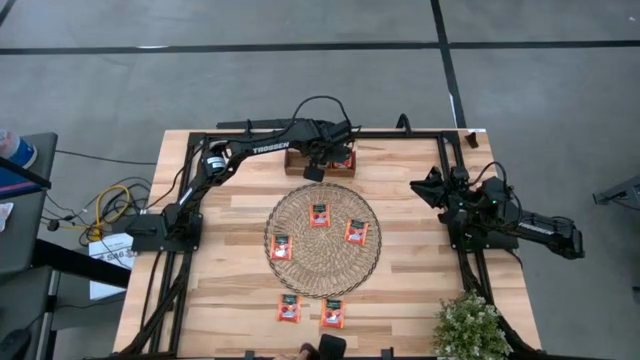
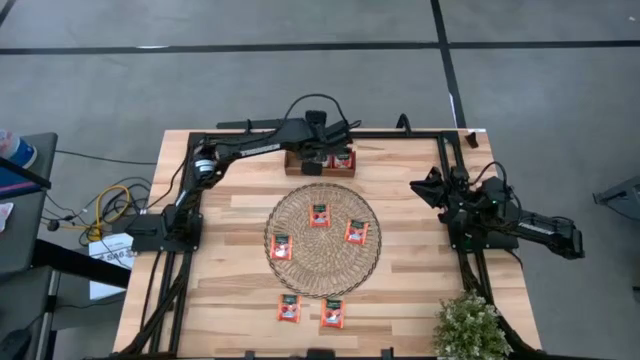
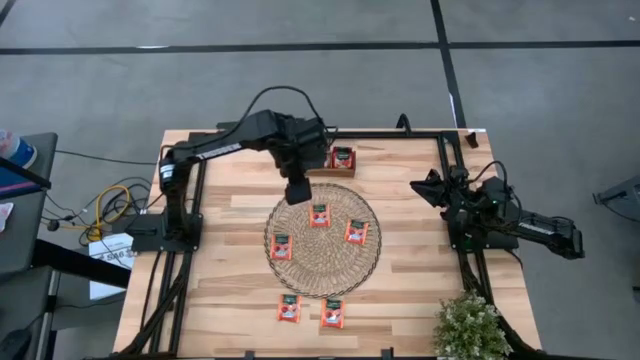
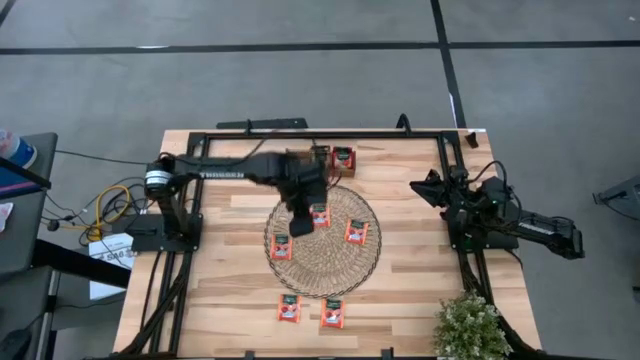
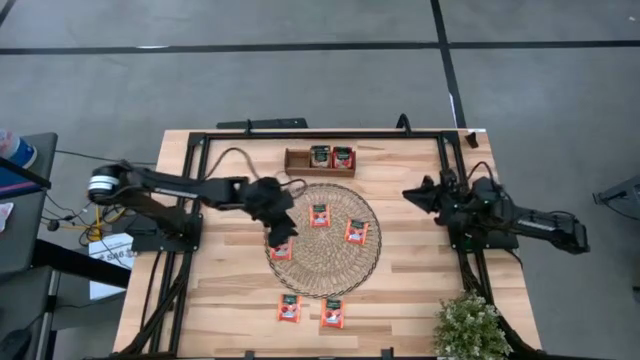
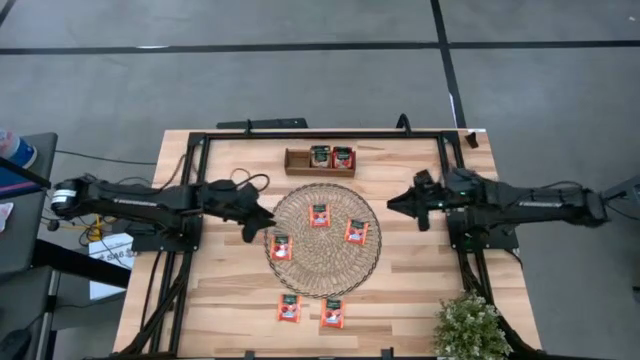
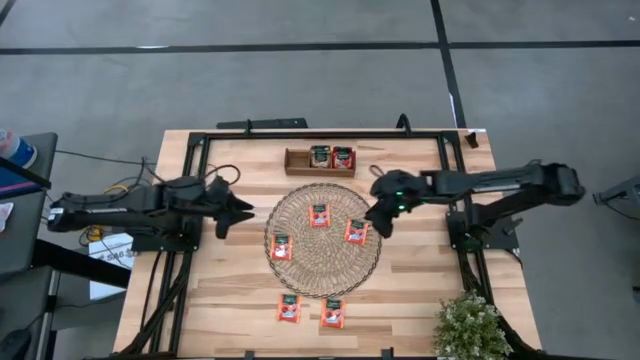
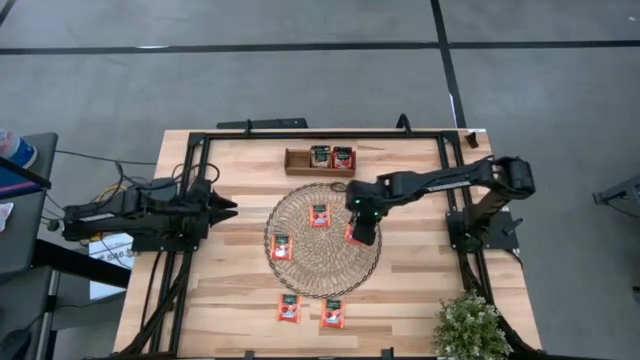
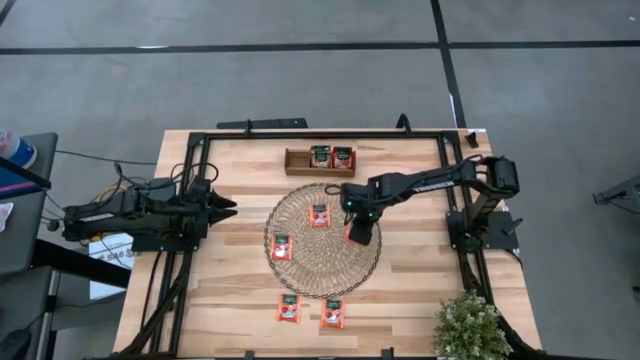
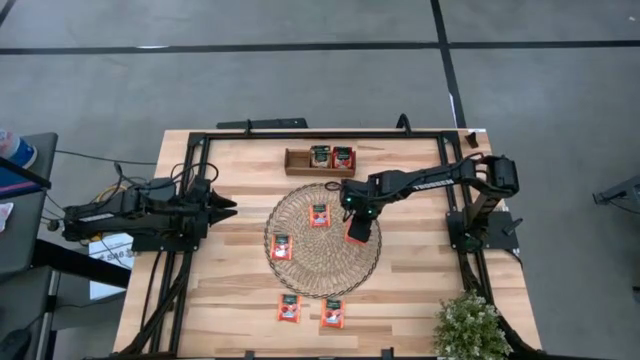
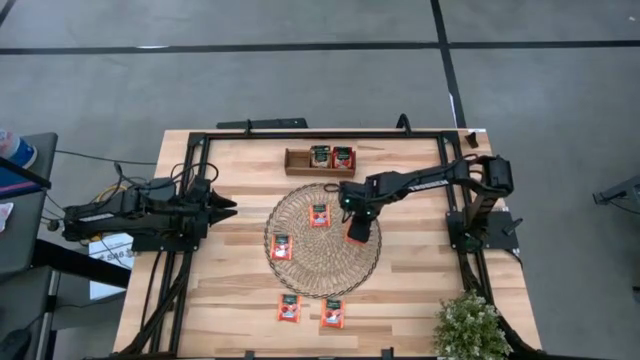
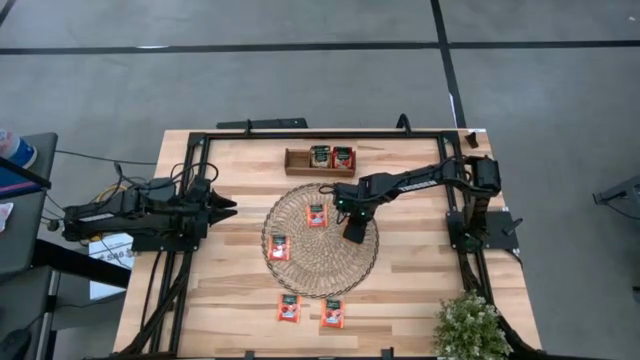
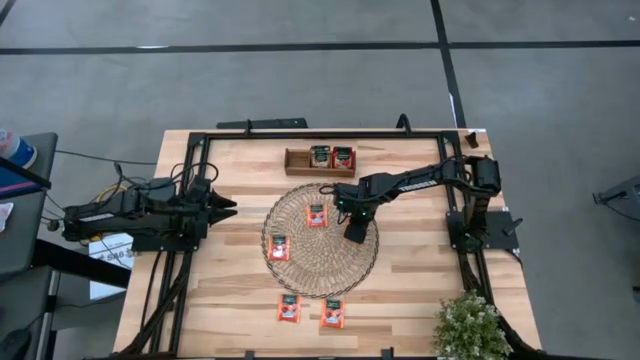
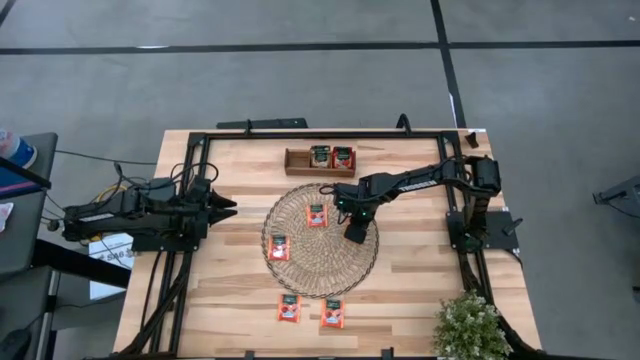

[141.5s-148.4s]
Task: Pick & Place Tea
Put the orange tea bag into the left section of the wooden organizer

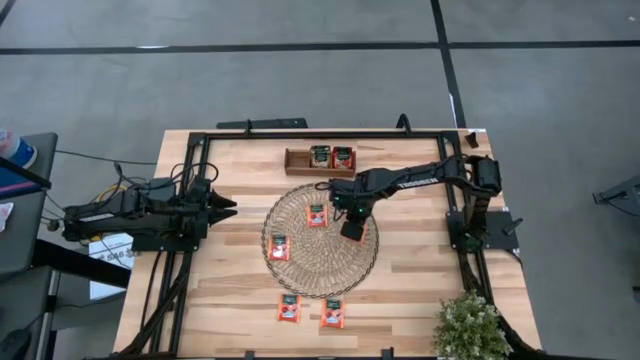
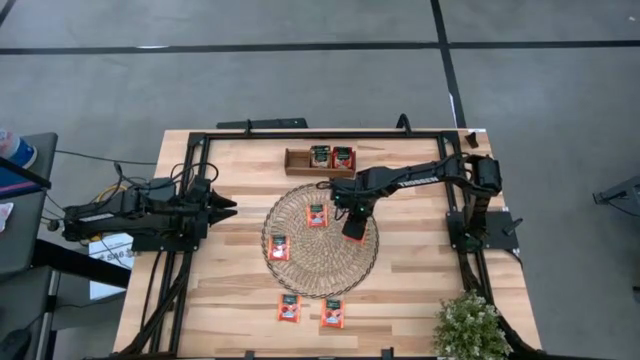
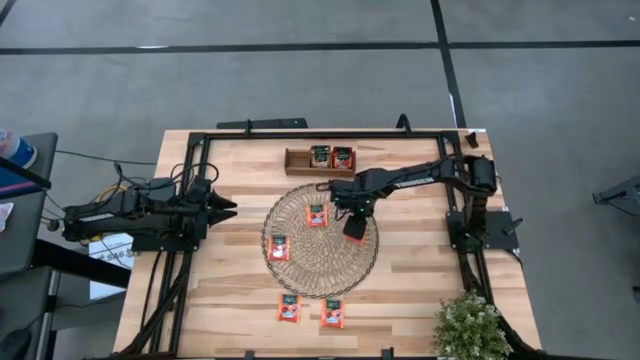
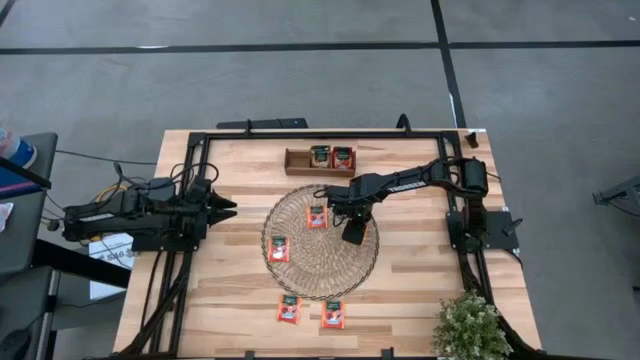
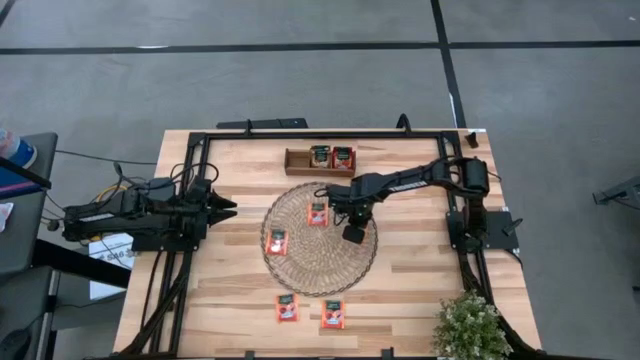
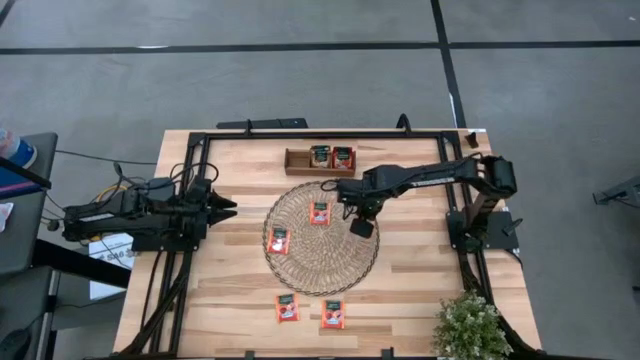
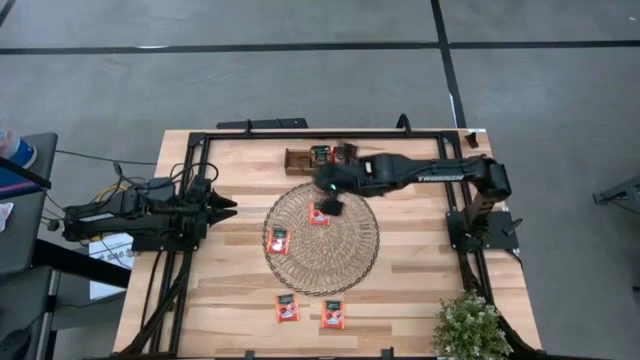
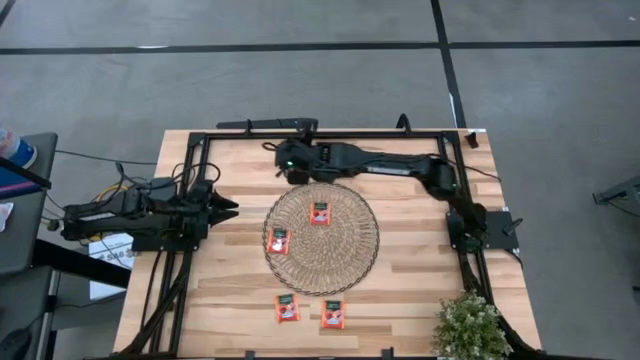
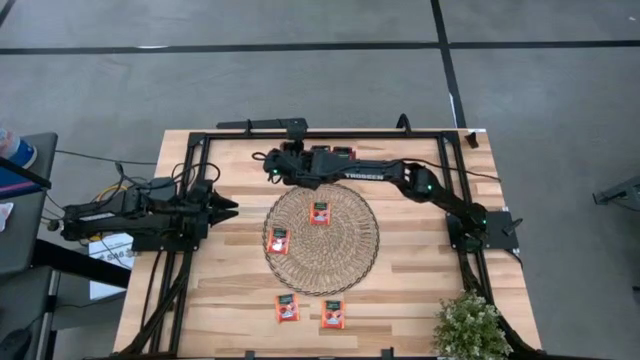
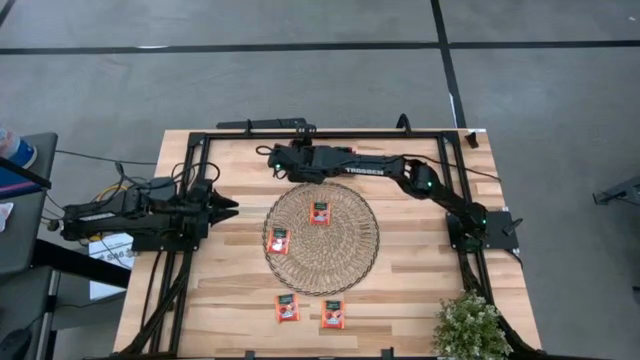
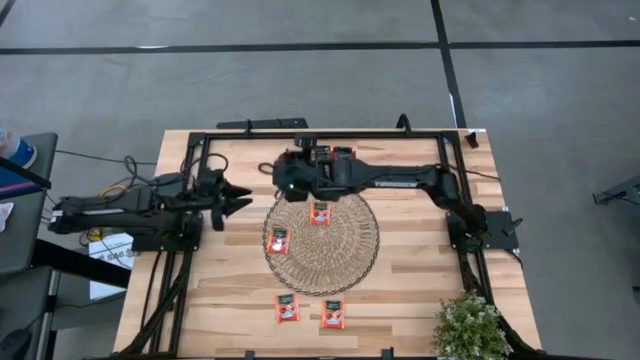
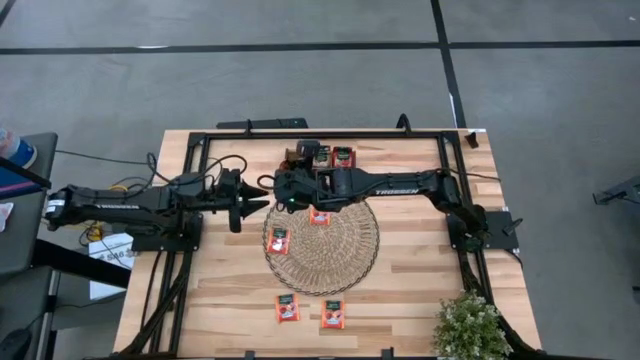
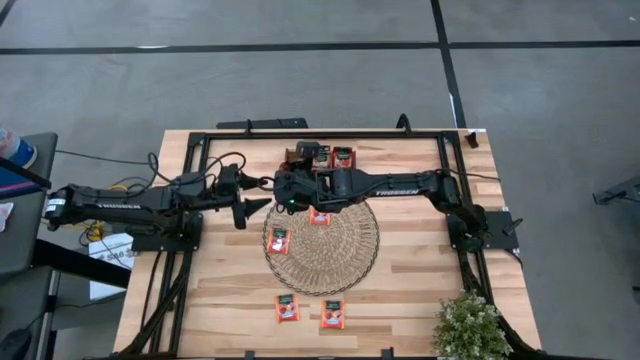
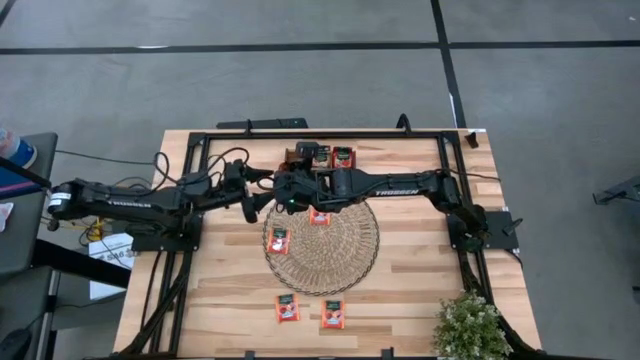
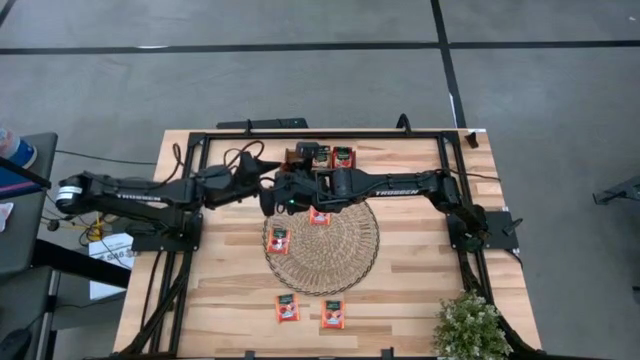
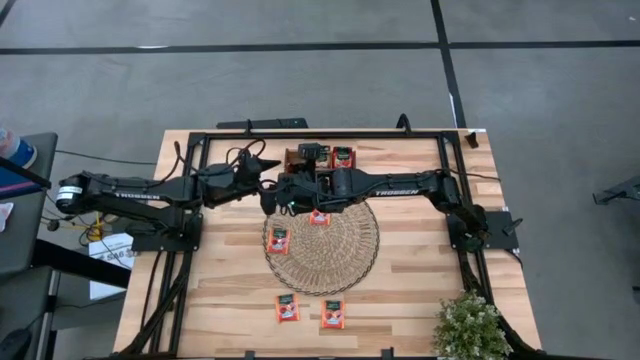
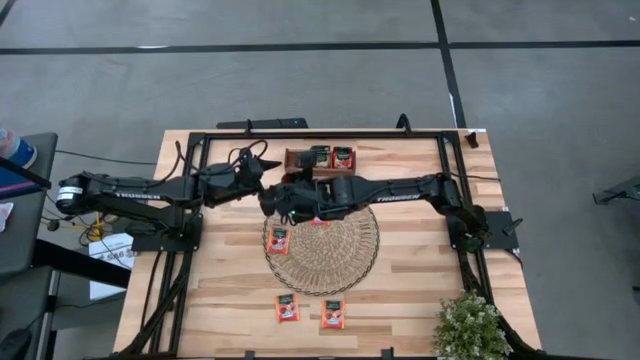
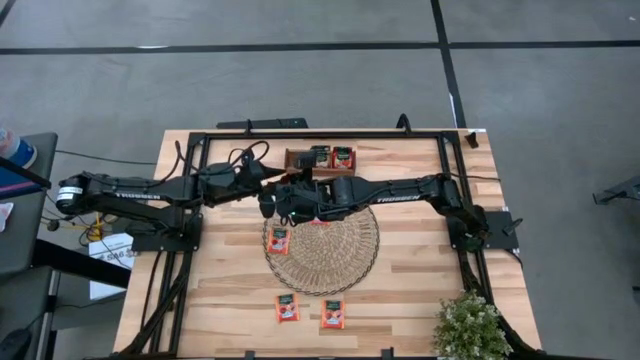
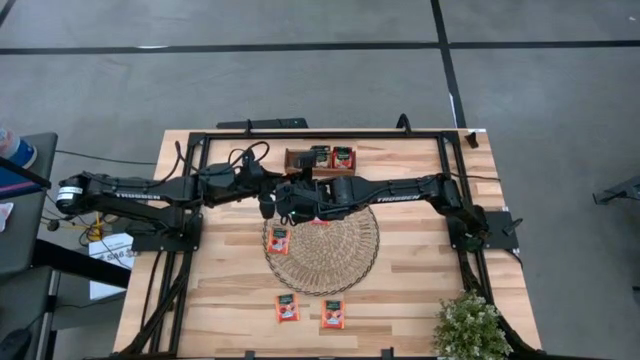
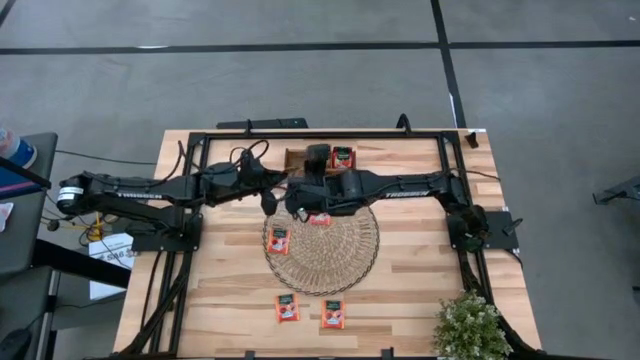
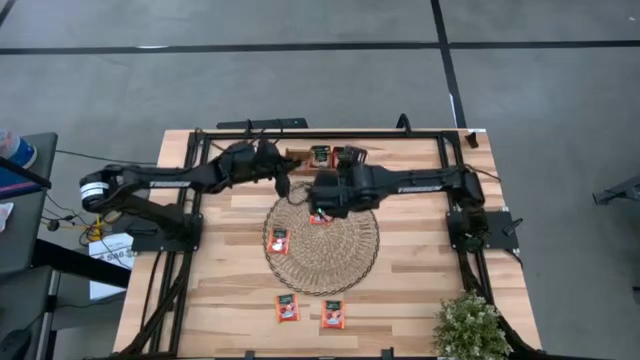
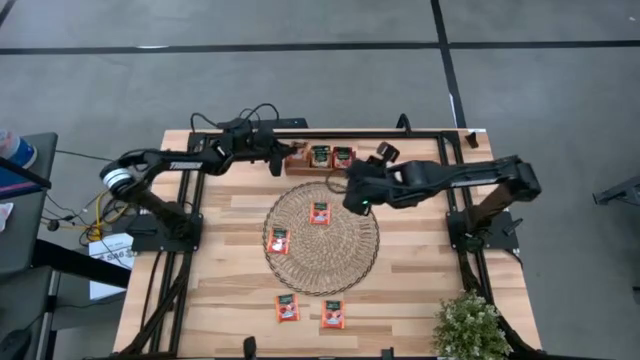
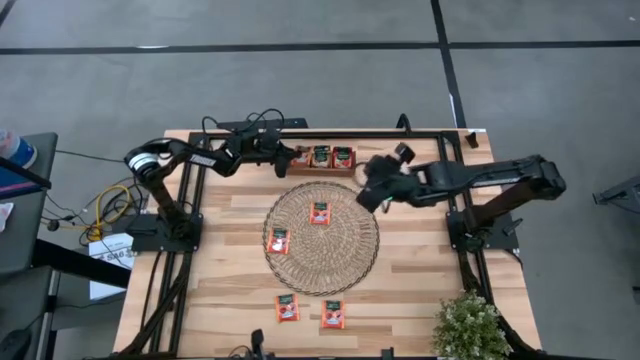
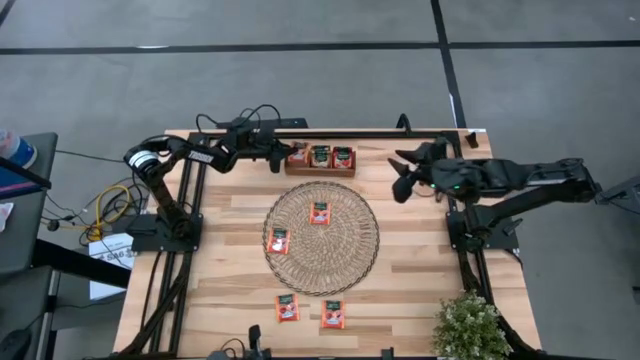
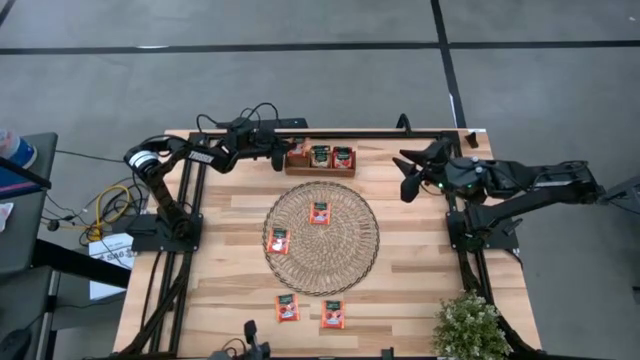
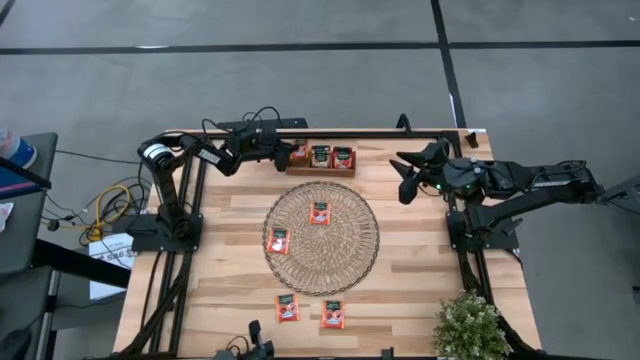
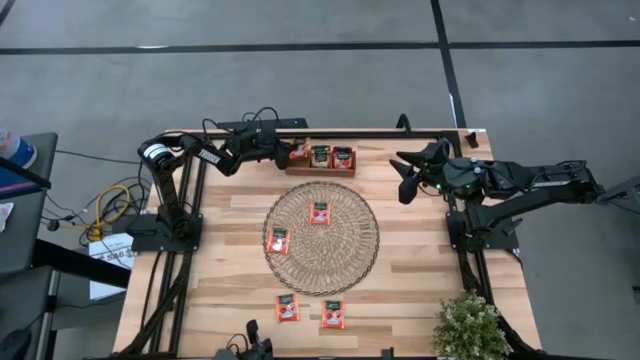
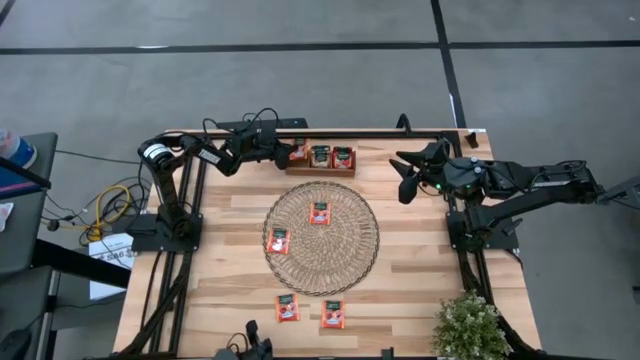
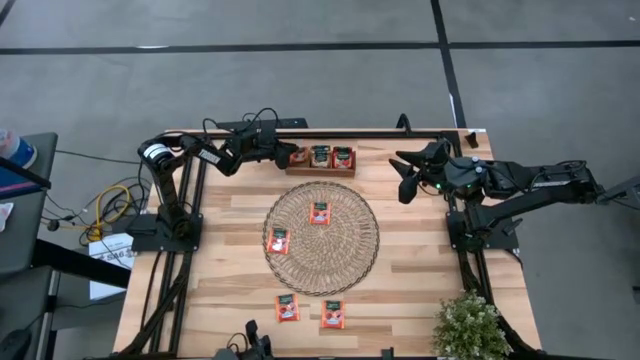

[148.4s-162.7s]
Put the orange tea bag into the left section of the wooden organizer
